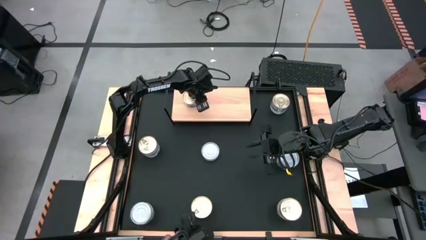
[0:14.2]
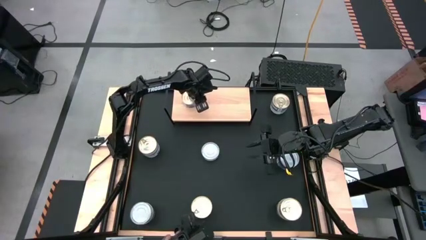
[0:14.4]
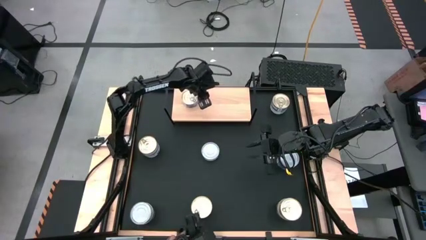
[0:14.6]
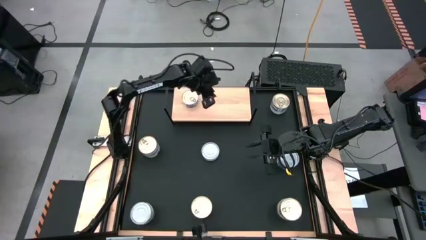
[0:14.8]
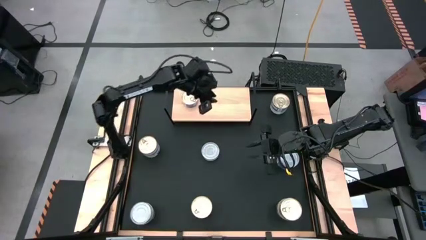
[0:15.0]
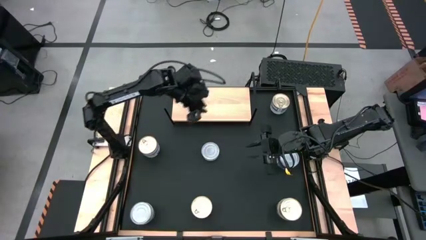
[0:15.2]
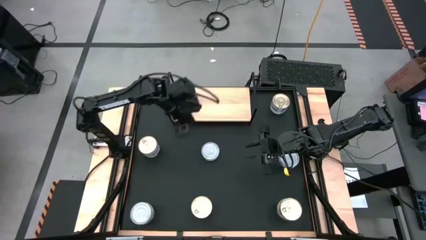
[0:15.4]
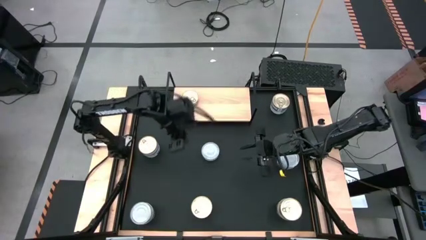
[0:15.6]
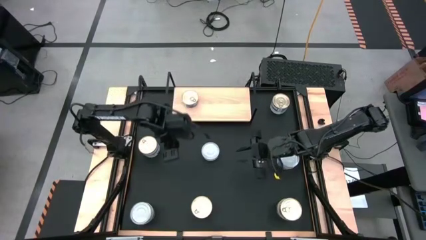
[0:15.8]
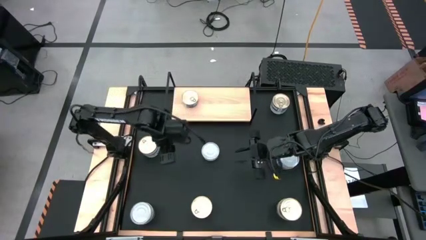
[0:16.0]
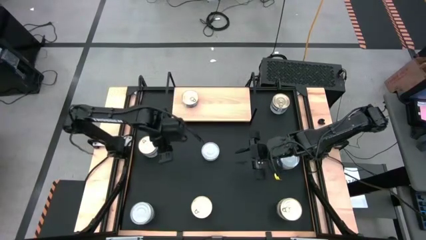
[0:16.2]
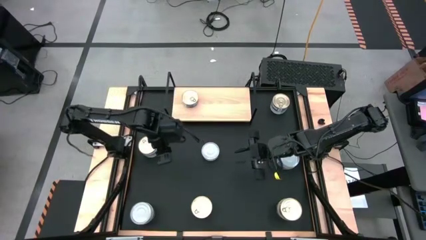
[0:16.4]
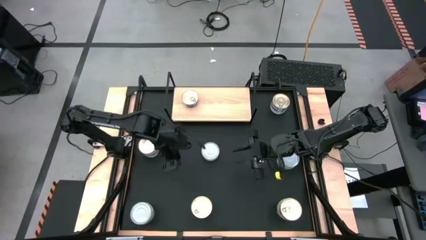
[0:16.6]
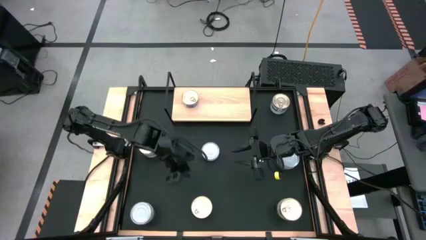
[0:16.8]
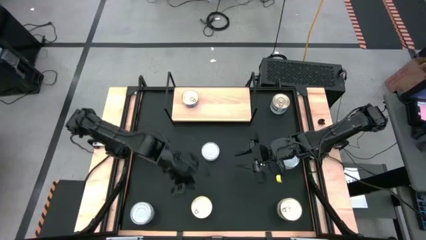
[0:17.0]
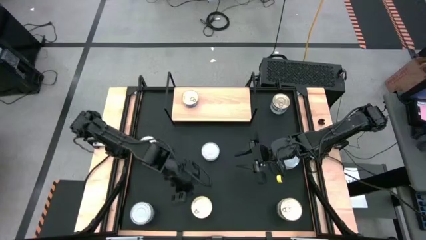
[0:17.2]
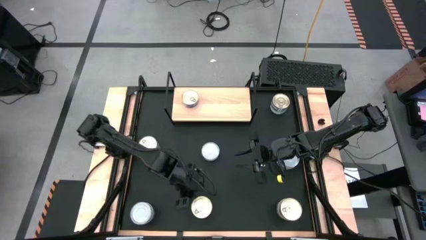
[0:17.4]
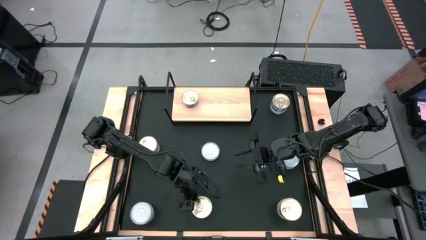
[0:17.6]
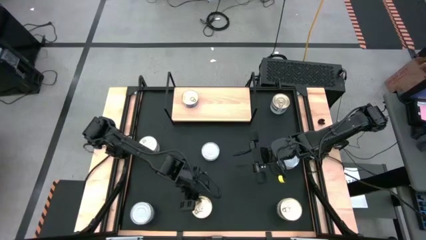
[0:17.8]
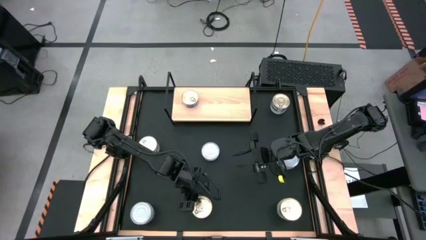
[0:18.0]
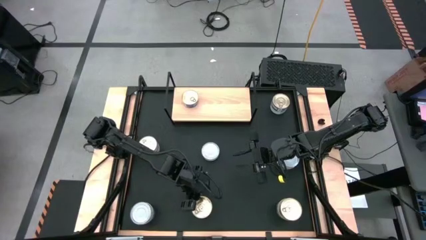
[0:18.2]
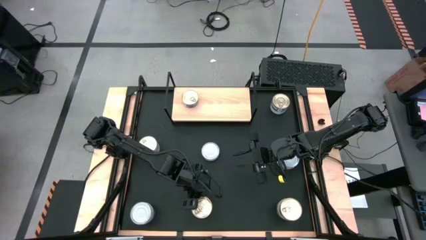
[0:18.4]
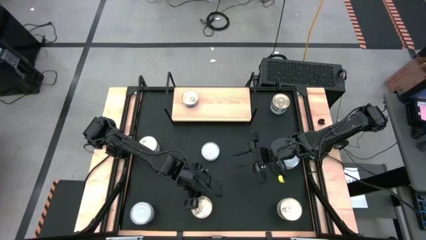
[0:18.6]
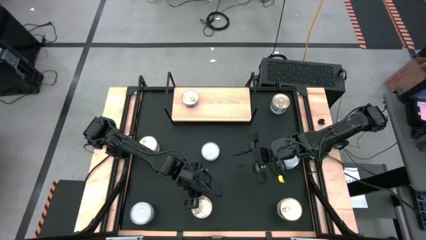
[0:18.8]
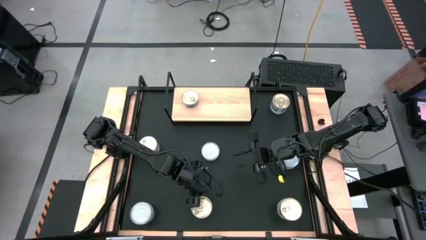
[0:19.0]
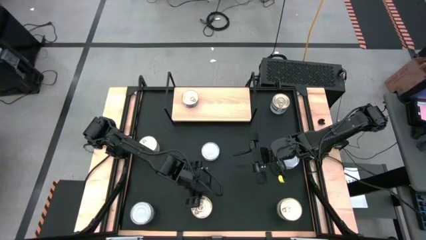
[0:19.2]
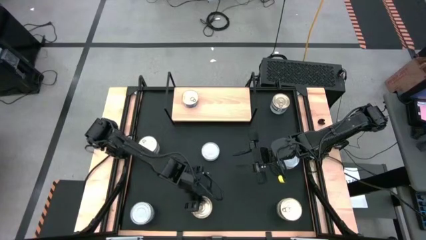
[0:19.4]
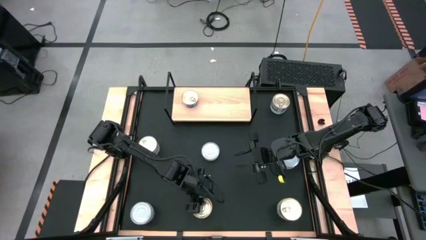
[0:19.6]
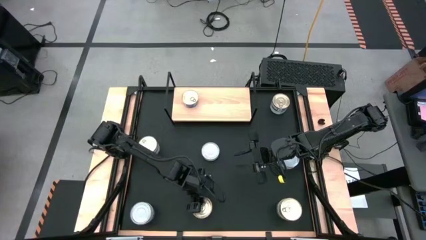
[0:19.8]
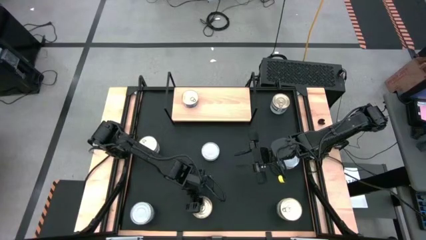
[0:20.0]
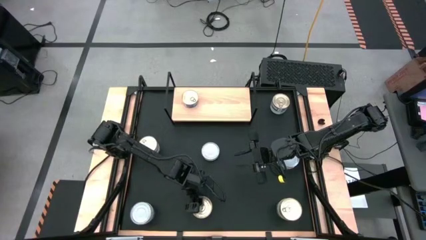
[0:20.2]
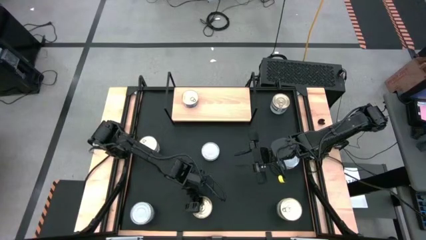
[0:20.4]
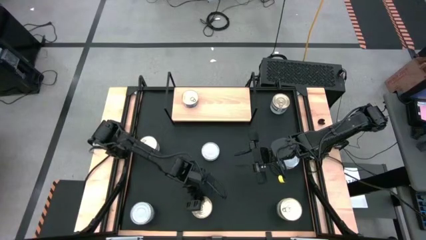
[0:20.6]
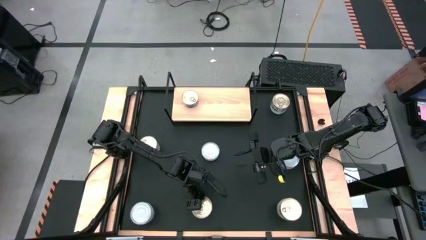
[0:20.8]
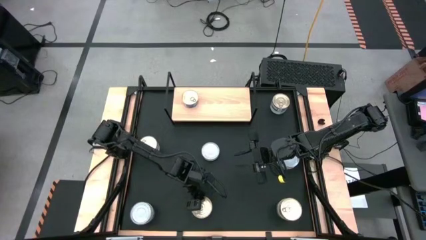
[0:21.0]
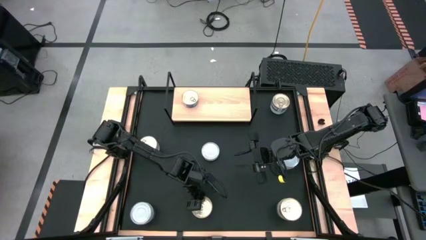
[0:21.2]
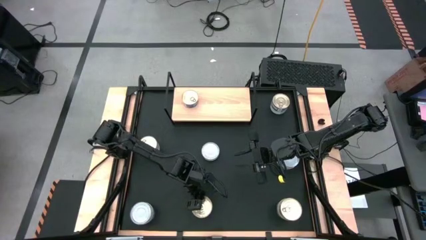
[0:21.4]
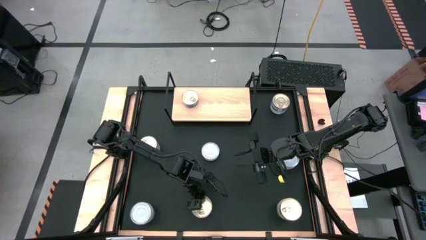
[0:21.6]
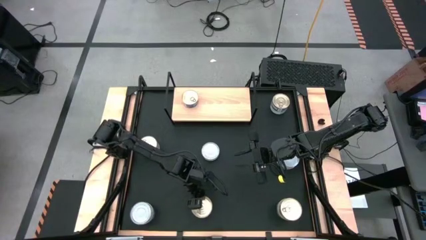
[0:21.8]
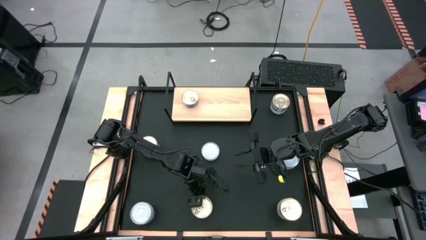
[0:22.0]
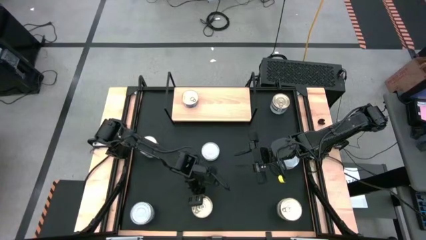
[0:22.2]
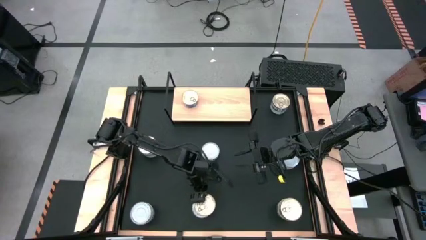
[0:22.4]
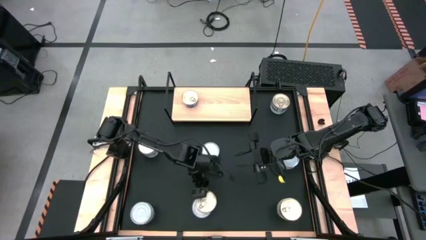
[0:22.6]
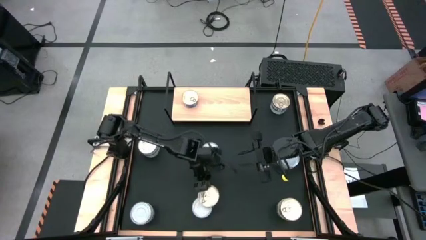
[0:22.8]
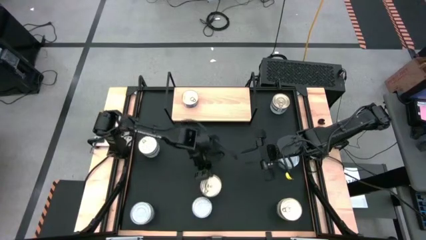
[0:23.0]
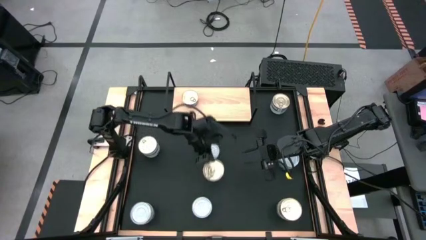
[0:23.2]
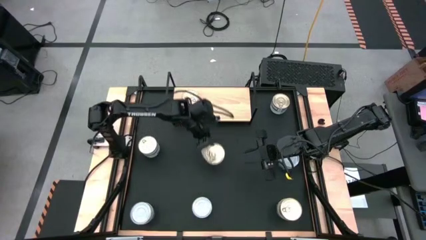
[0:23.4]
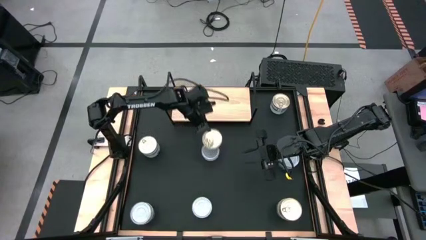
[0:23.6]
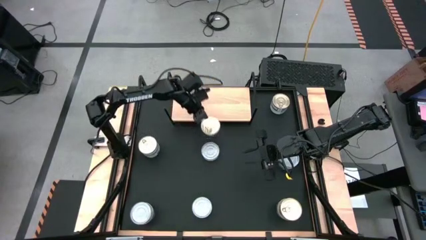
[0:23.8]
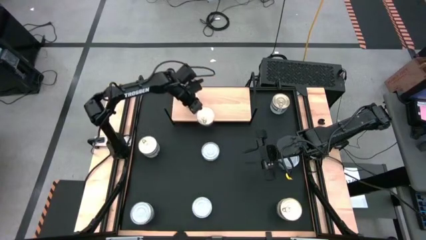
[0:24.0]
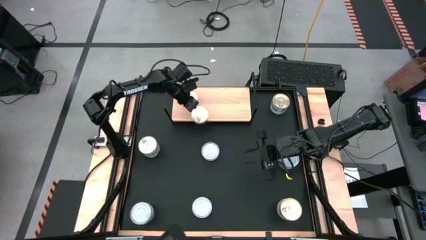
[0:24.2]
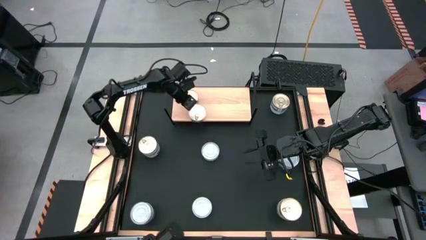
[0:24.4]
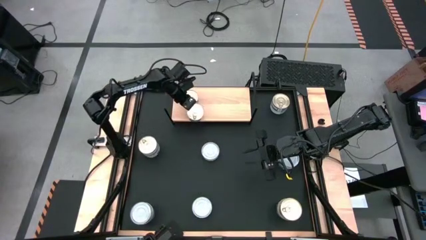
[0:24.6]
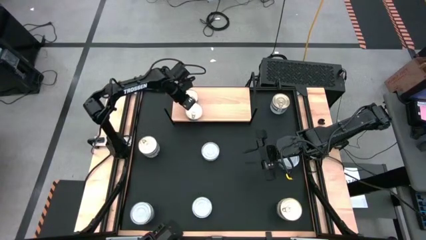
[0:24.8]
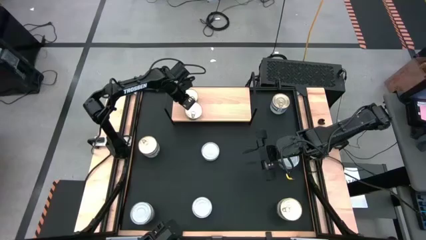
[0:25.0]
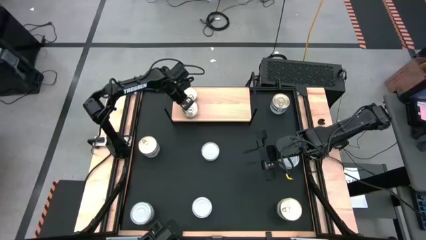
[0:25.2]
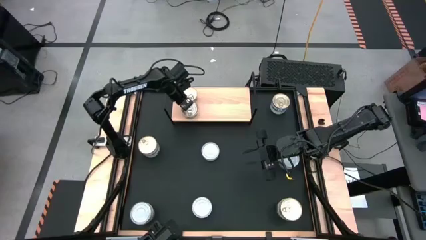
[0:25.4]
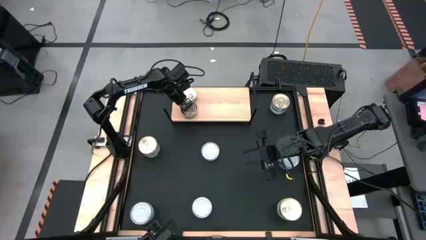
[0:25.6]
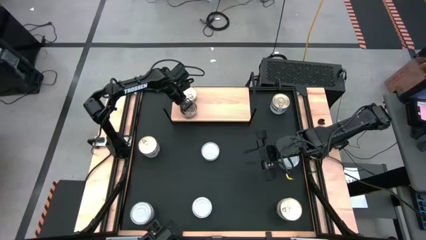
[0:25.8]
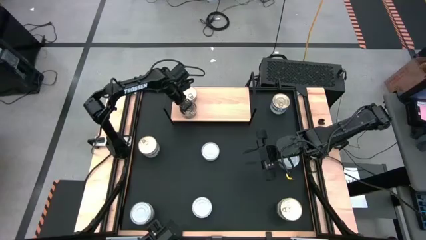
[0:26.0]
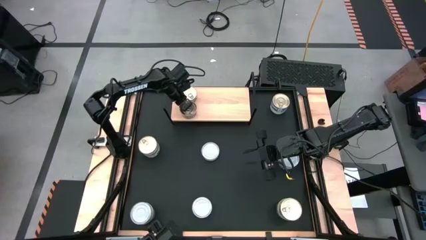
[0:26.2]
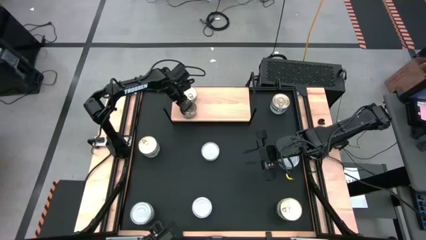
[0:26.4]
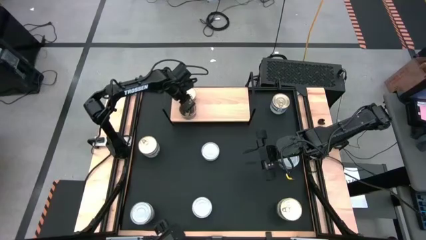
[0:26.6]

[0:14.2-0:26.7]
Task: Stack canned seafood by type on shelf
Put the blue tuna can on the shelf

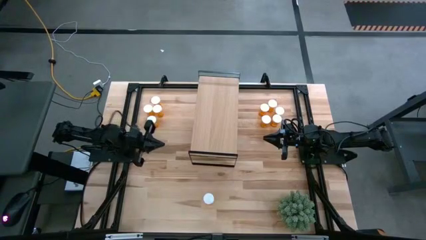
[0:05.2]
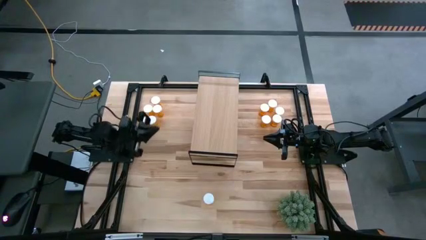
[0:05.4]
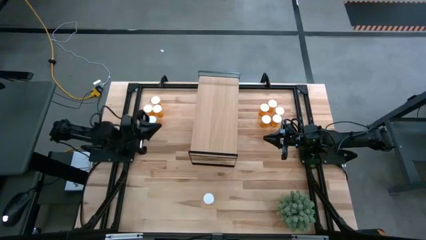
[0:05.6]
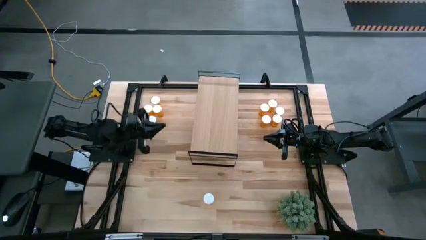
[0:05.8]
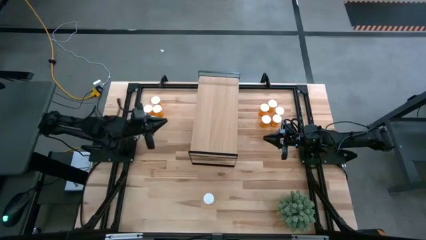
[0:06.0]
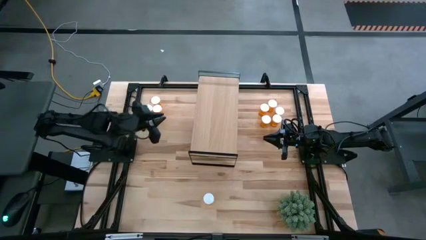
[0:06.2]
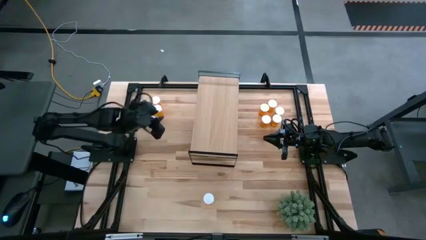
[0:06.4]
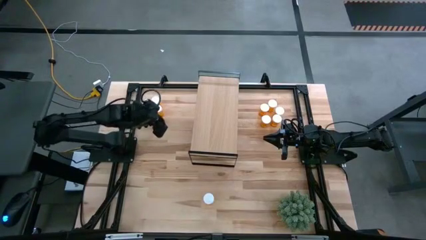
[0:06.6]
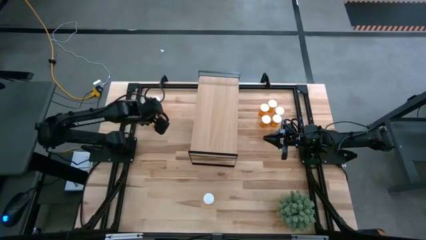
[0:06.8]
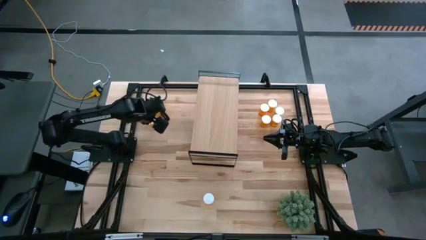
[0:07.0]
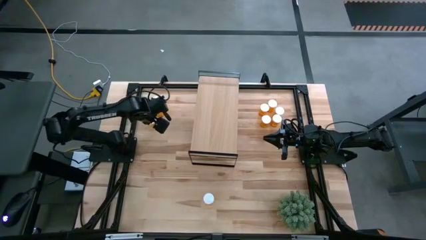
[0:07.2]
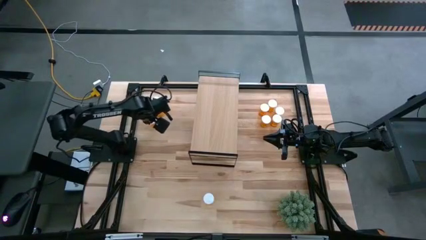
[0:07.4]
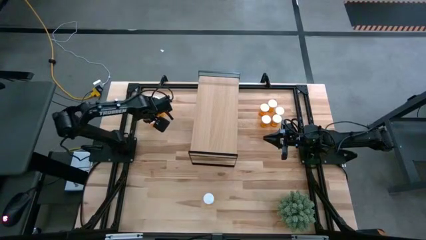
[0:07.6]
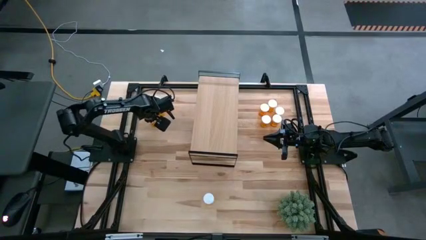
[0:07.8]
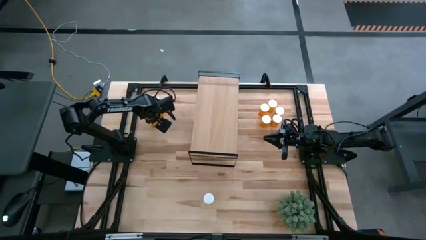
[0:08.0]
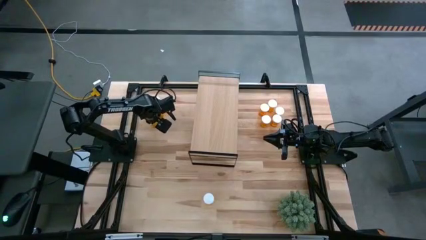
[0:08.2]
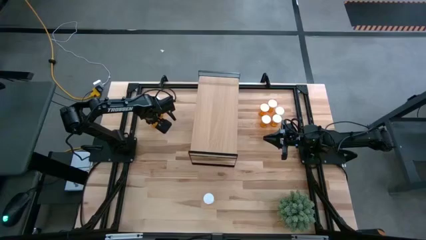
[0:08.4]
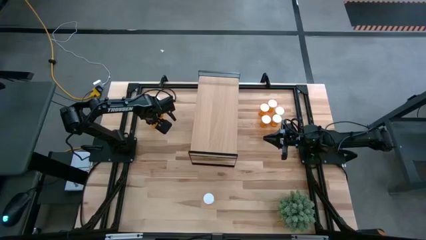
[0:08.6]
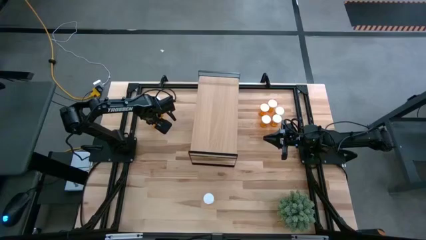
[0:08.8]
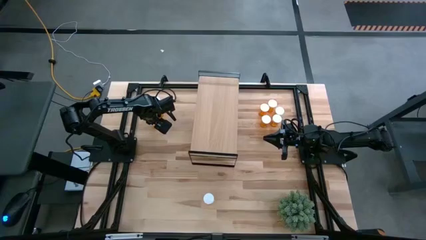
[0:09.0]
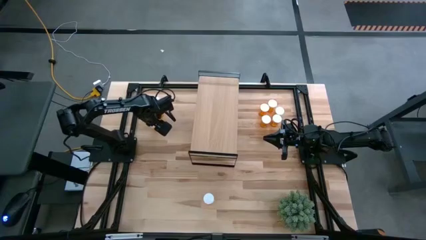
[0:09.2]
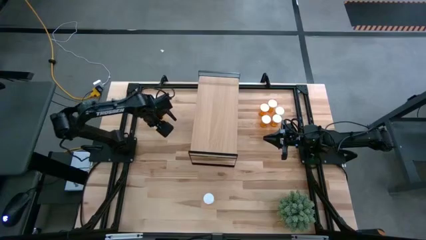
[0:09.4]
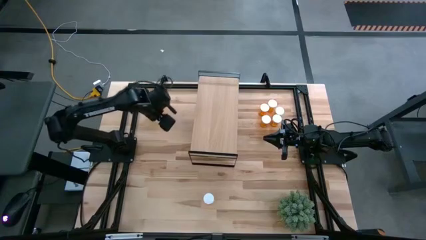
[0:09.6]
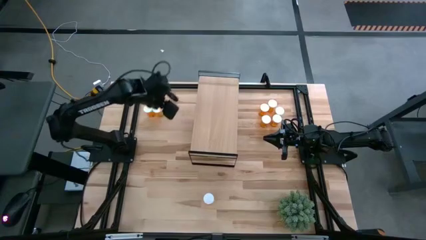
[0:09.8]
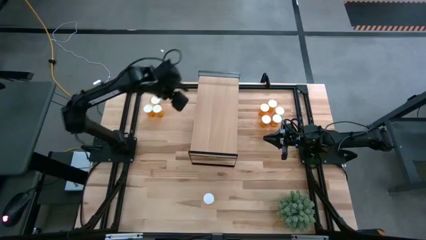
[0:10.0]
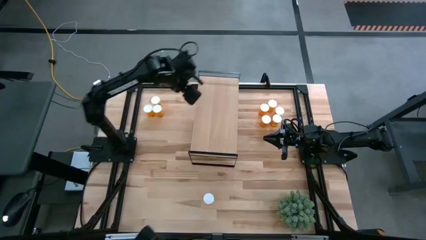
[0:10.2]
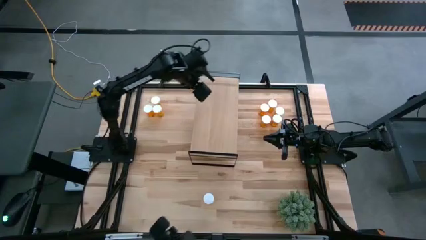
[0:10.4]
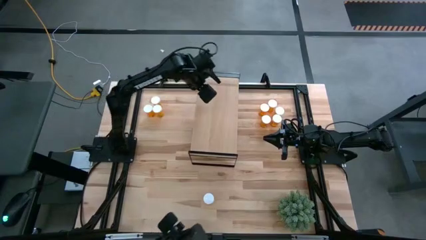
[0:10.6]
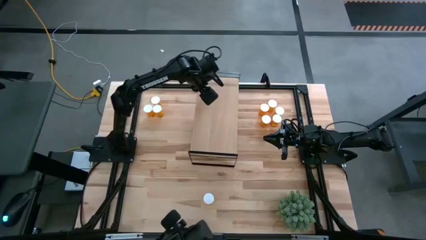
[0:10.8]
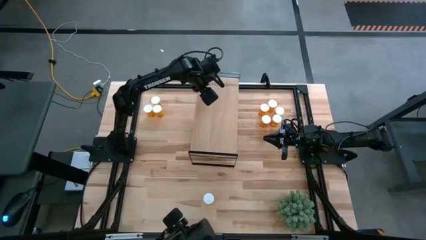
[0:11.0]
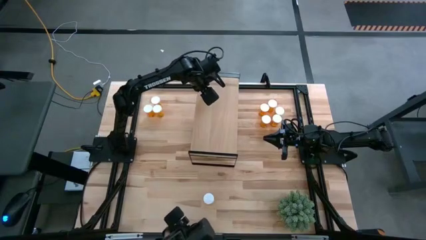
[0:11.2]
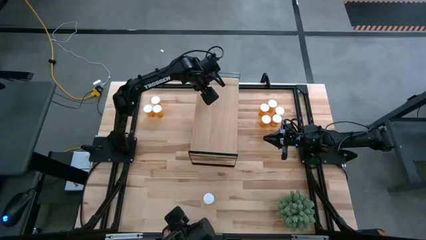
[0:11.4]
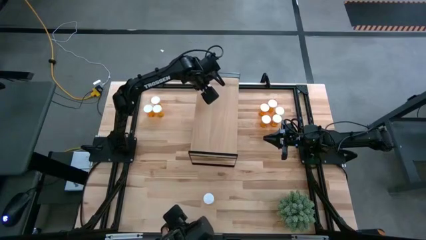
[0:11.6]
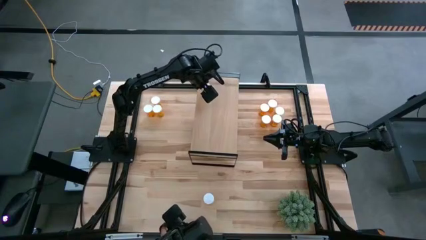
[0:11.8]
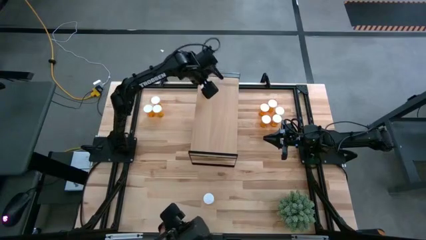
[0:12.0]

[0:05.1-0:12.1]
Task: Pick and place medicine bottles onto shelf by color
Put the orange pill bottle on the shelf
